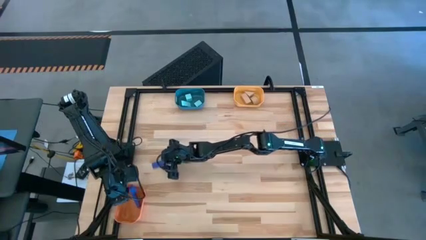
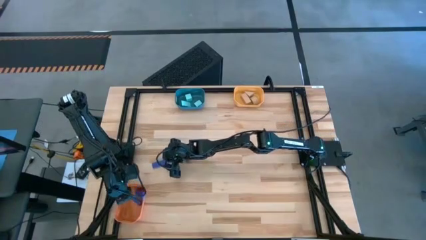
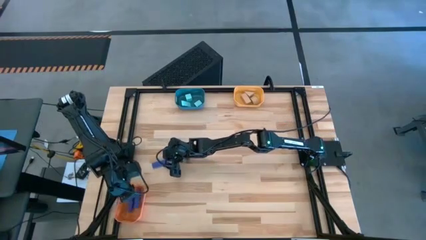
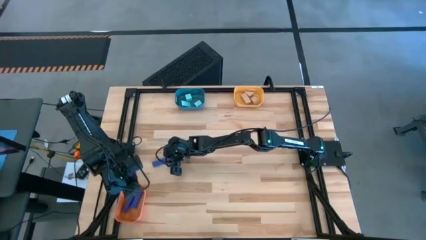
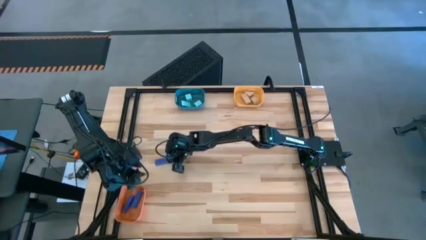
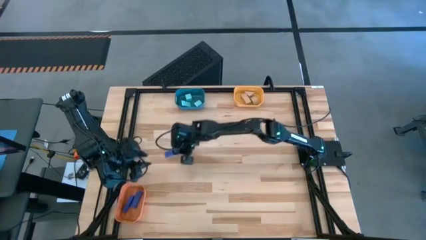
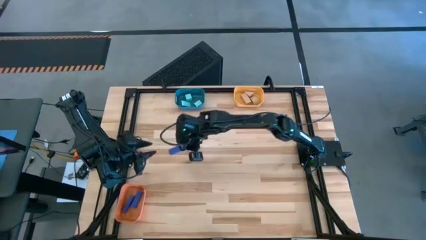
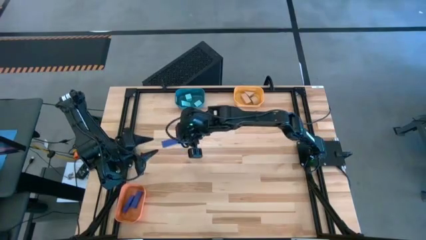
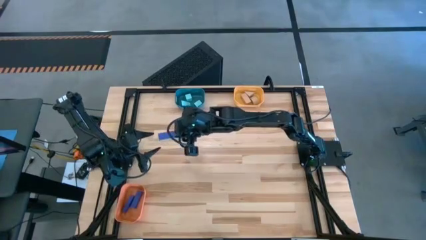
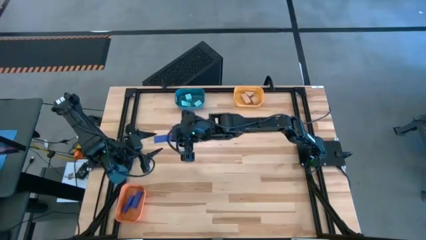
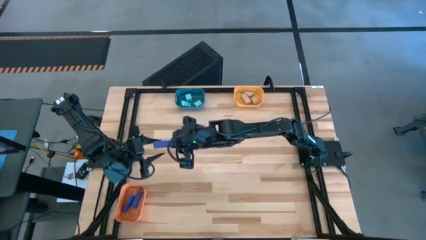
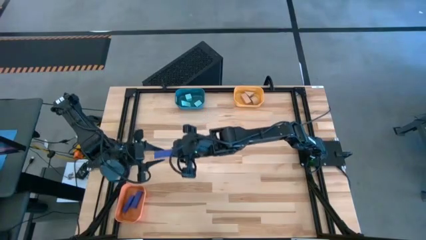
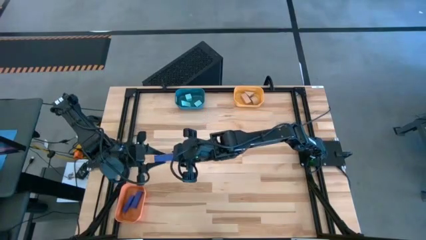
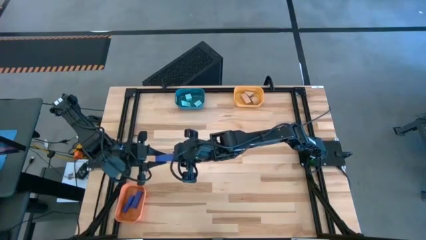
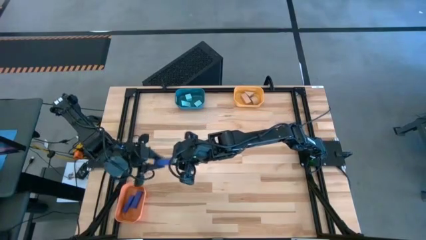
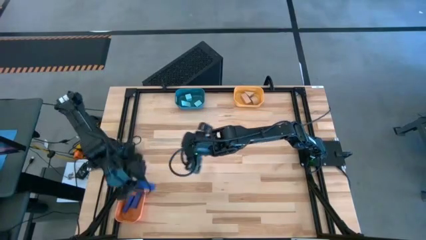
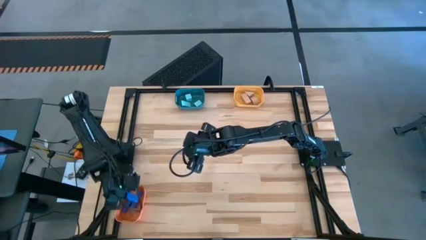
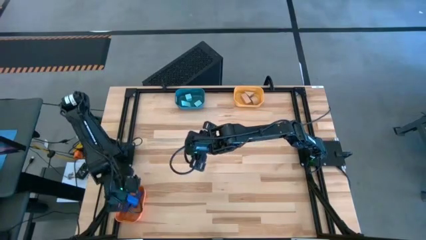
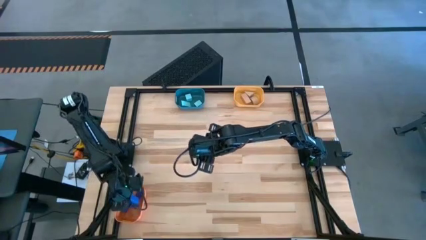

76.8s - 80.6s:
Task: Sort & place blocks by color
Put the blue block into the orange bin

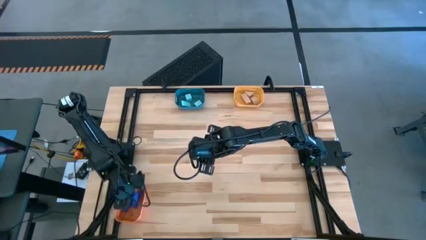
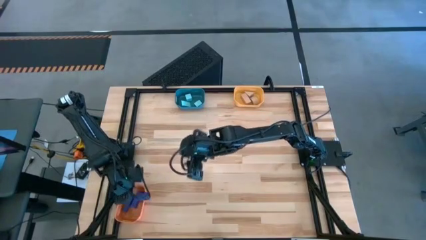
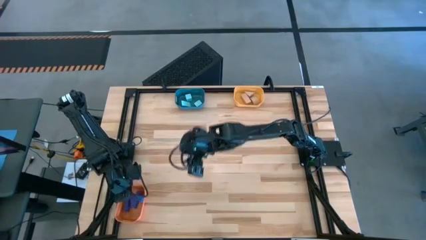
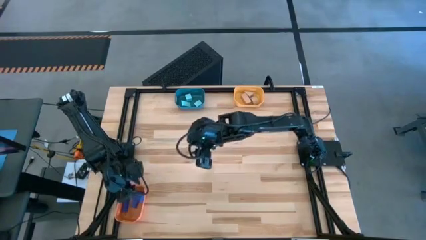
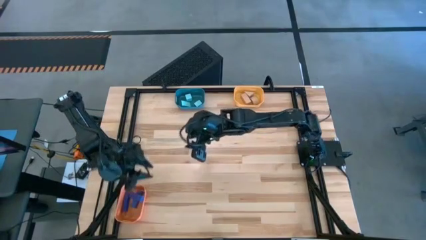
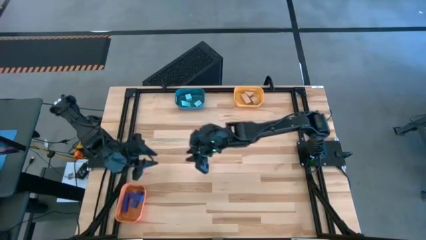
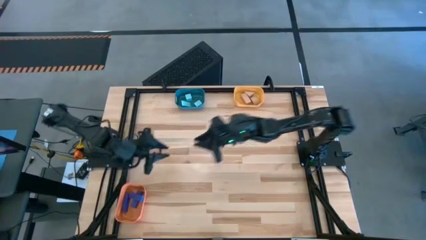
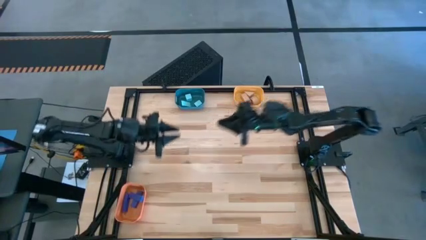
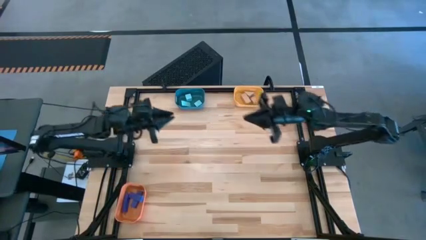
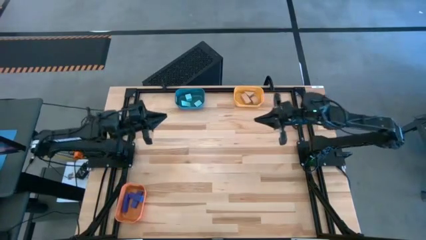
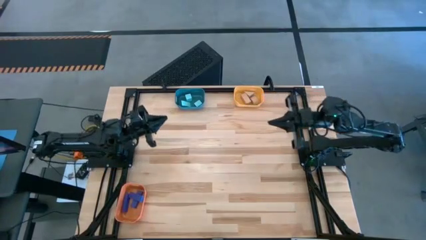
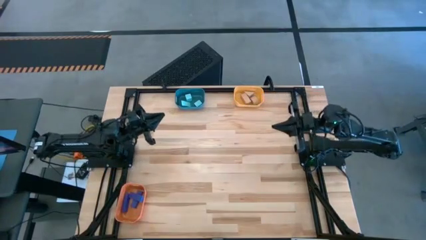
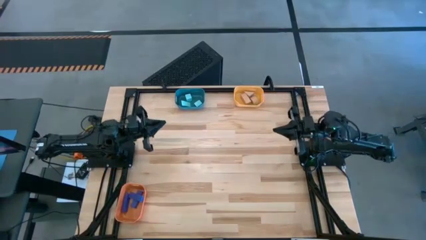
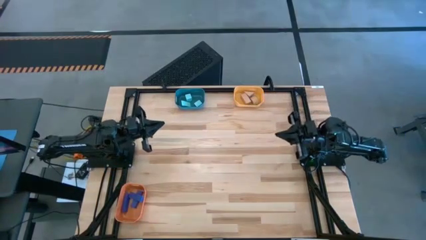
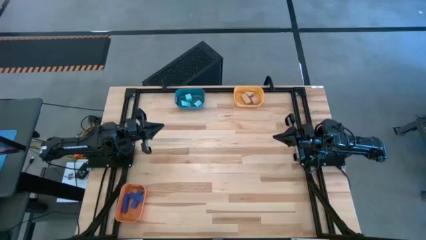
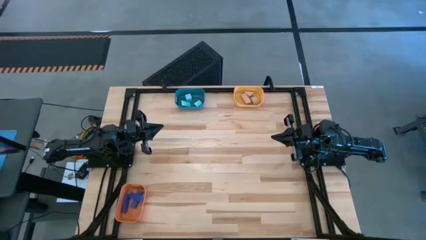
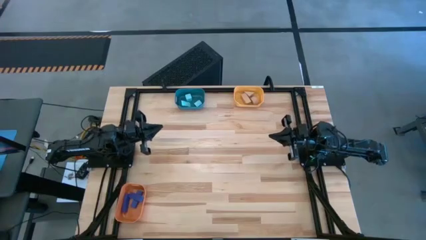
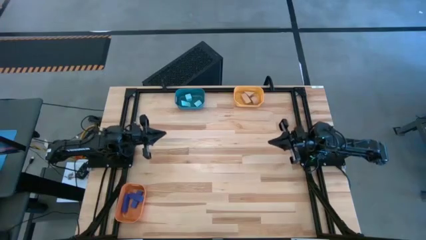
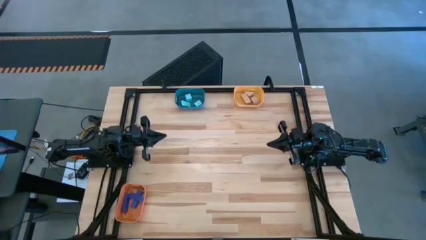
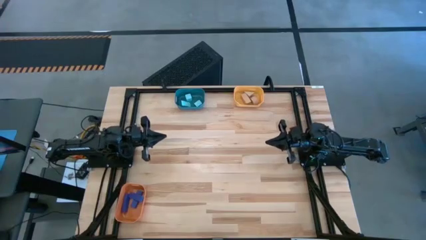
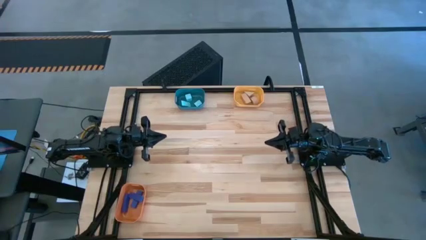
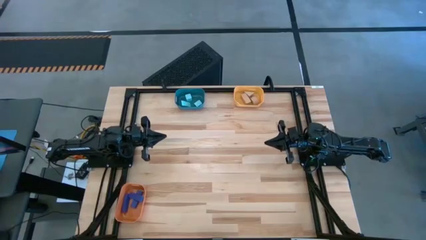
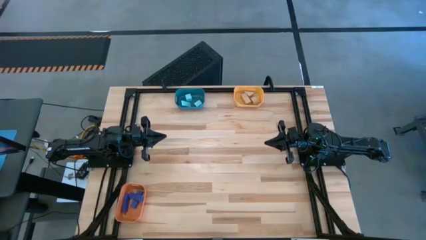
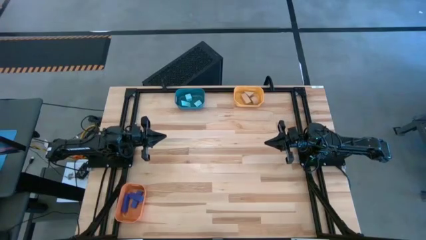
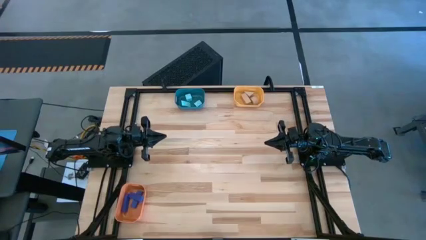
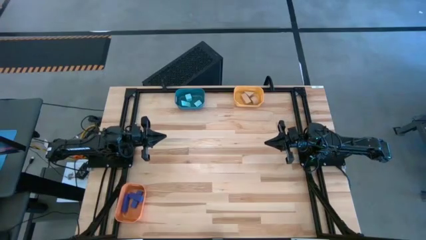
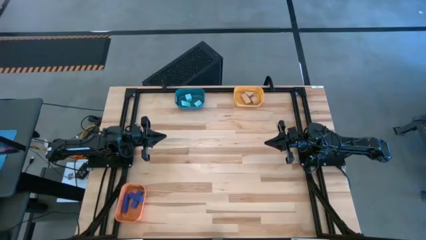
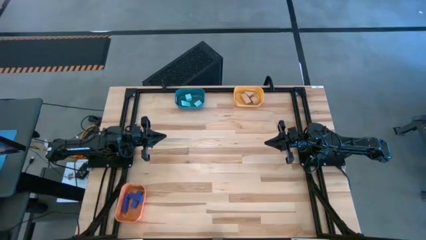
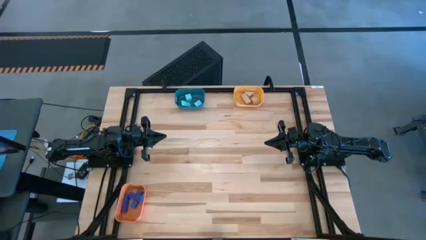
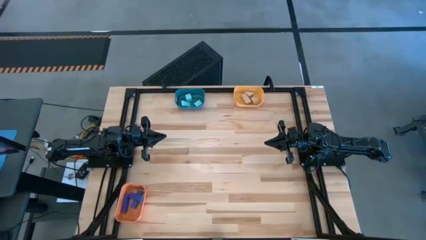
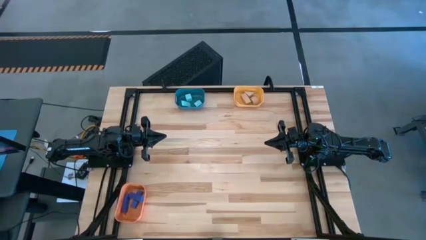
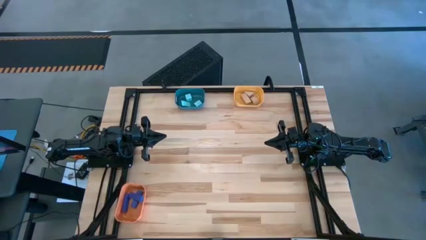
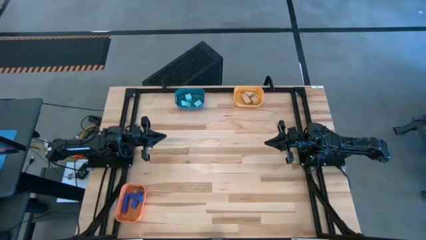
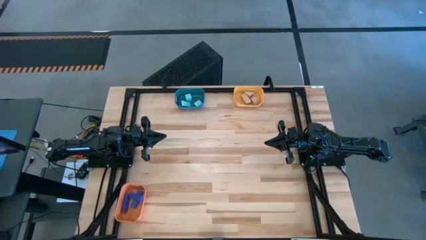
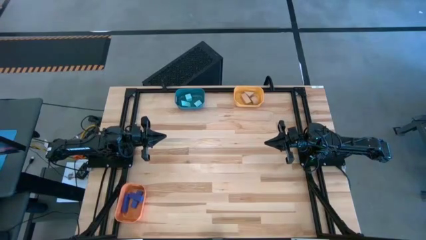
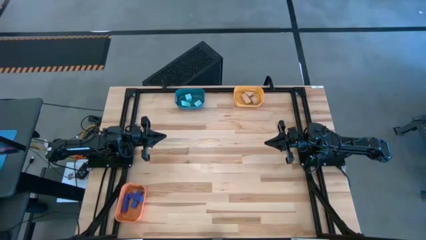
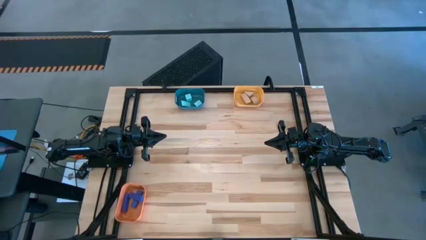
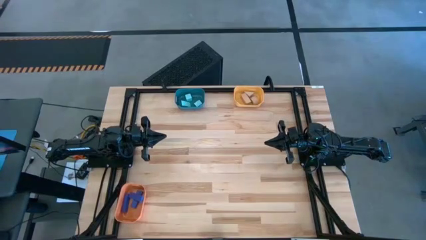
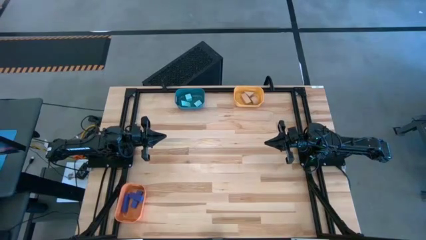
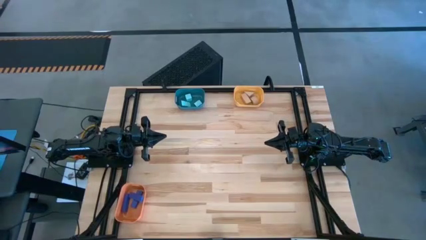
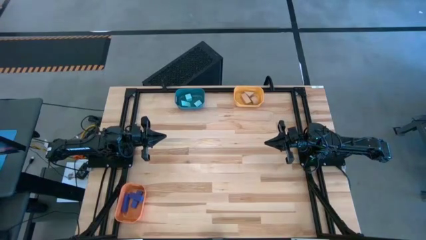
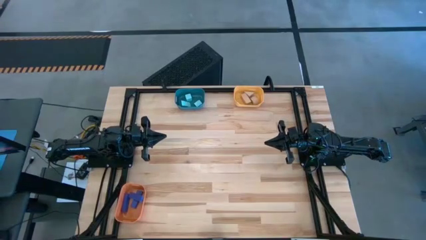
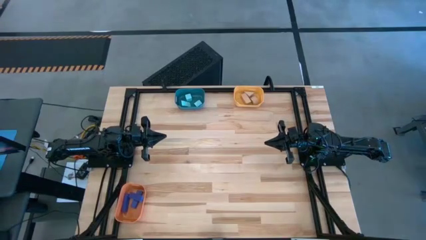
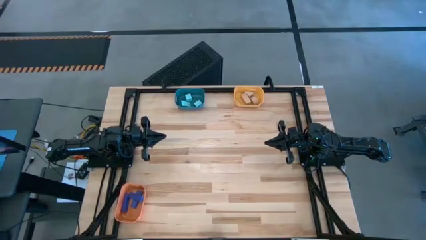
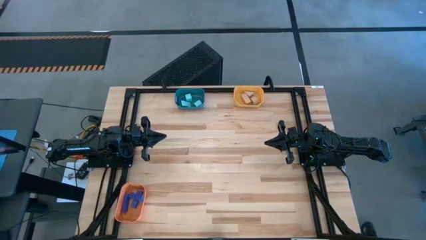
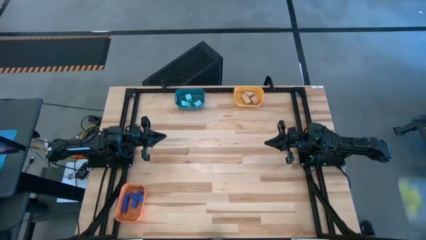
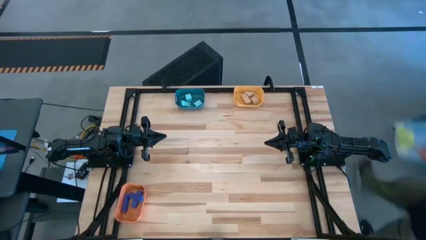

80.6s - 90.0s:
Return to Home Position

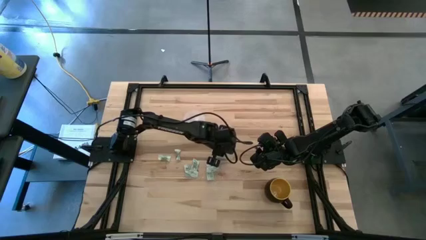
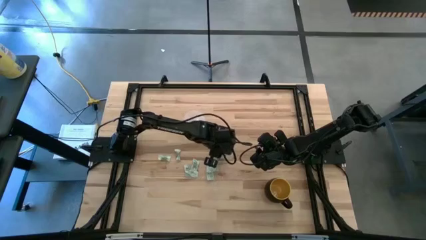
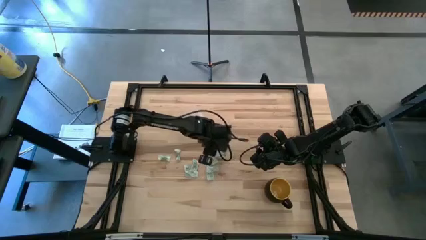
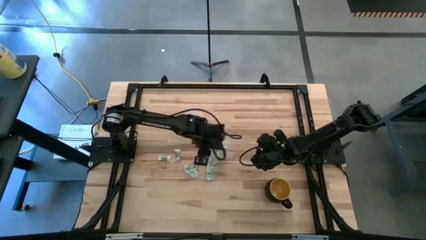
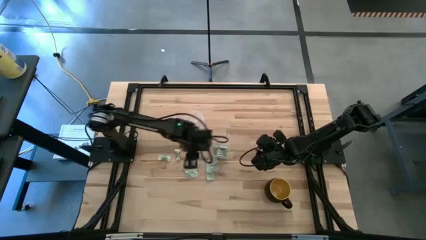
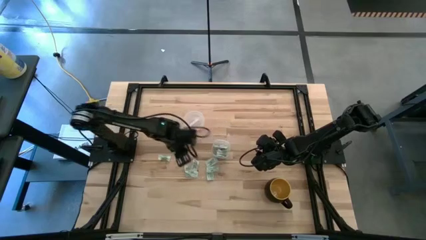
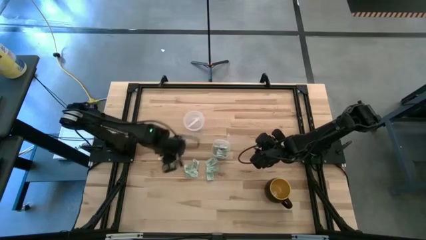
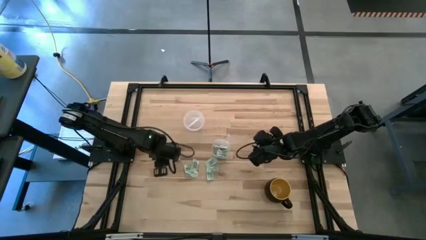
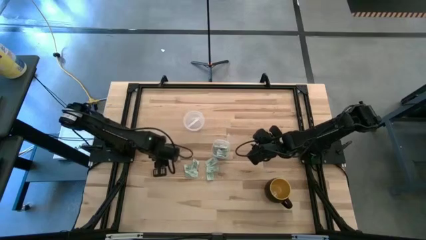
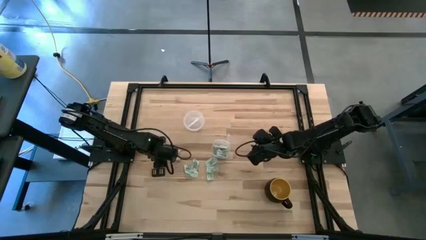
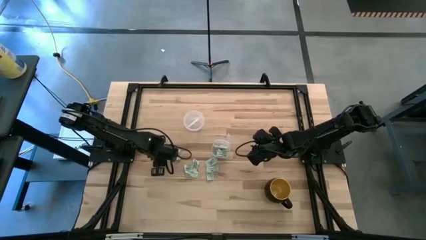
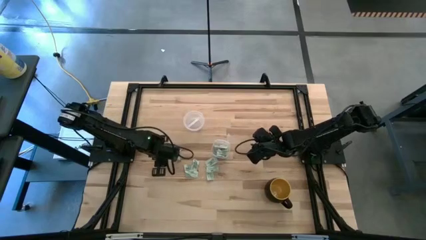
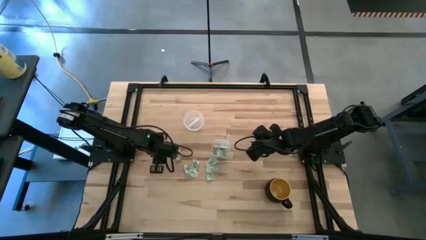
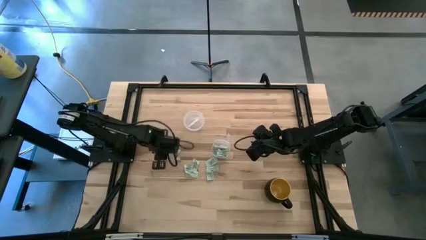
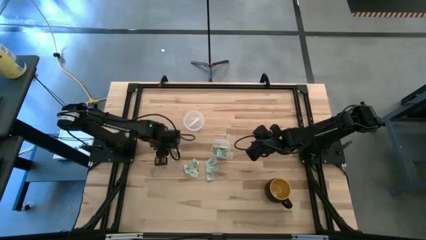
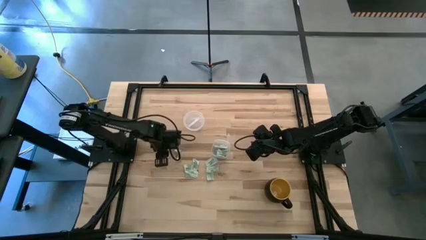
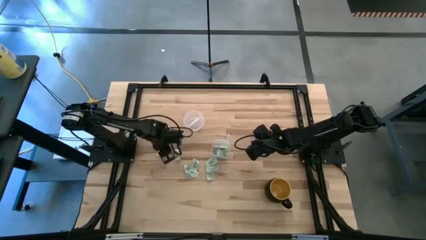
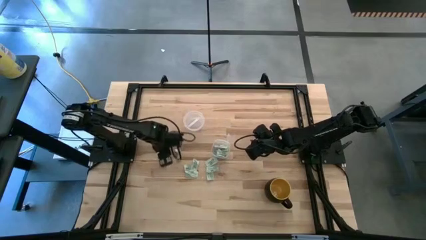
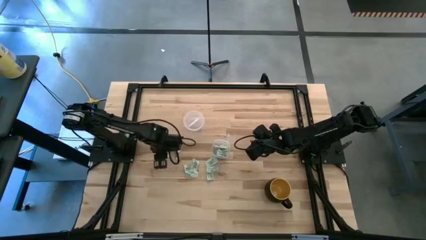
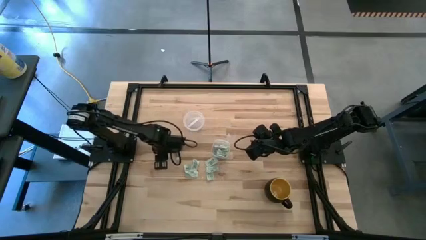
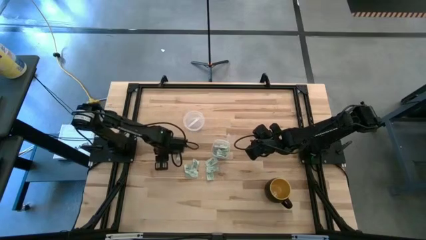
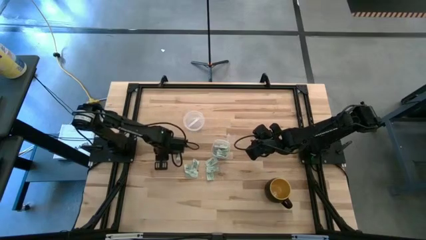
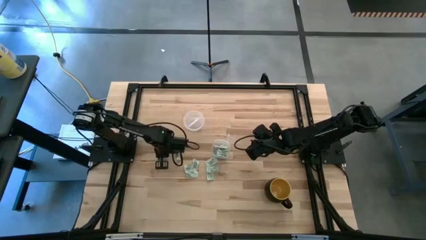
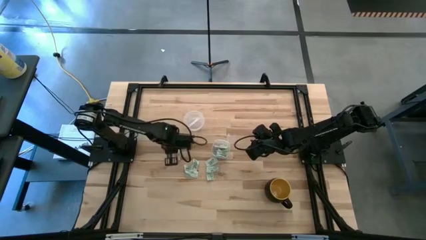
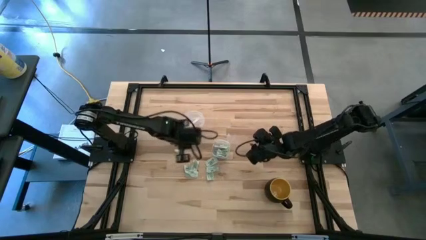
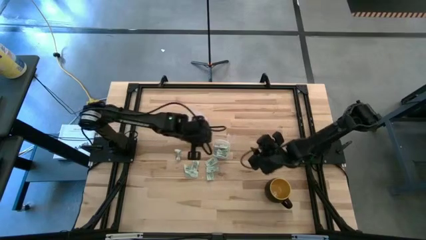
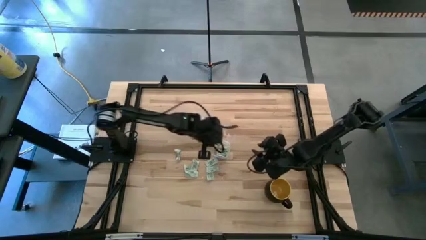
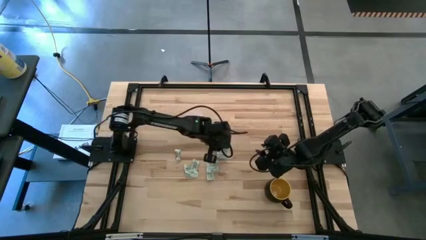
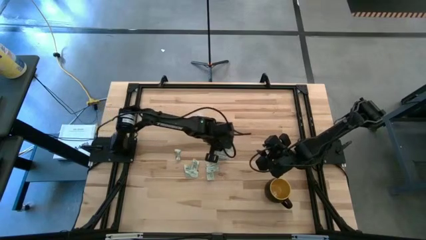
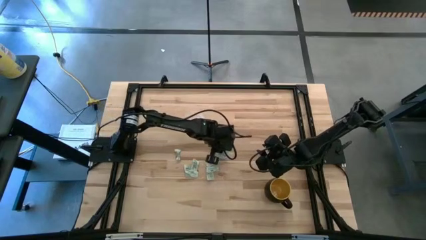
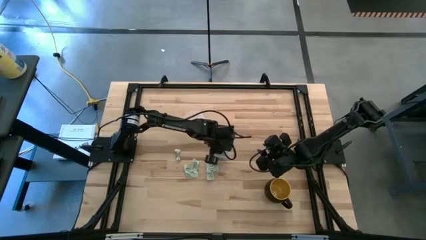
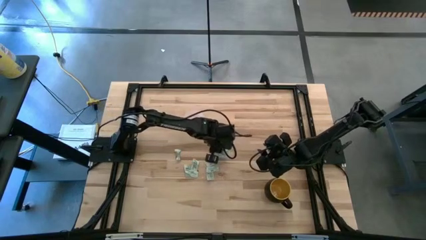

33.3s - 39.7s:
Task: Pick and place items into bin
Put the light green stevia packet into the transparent bin
